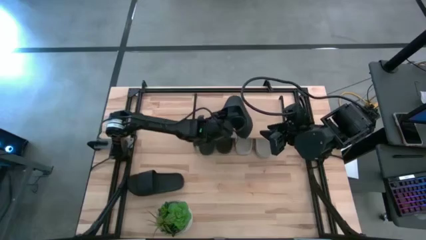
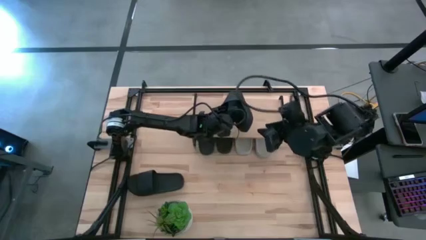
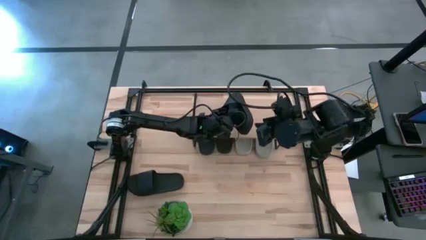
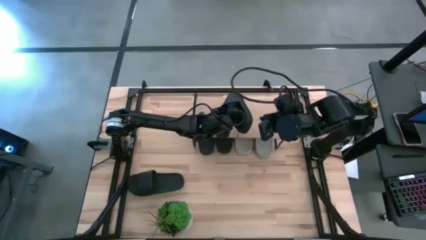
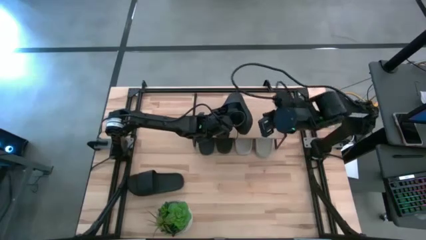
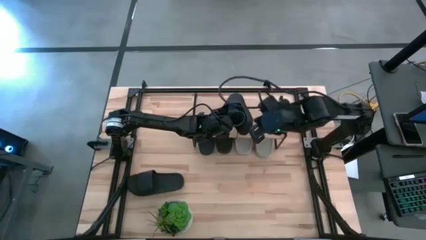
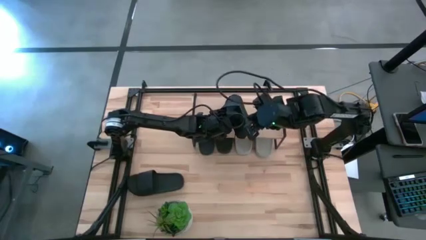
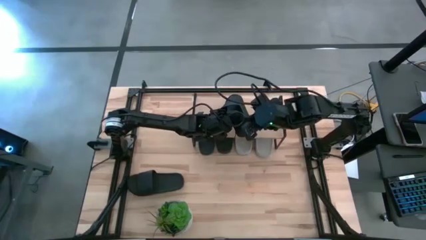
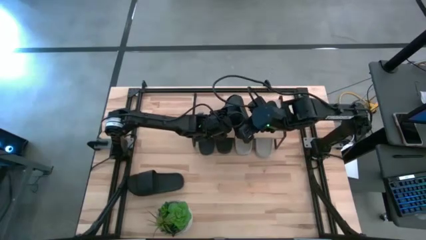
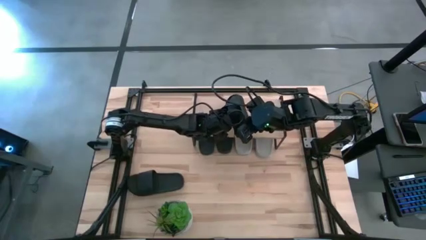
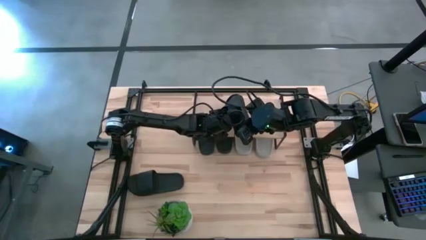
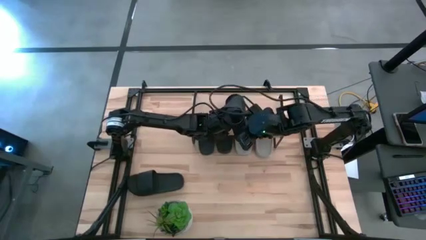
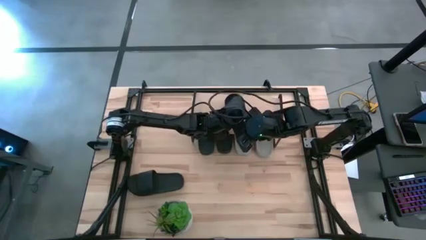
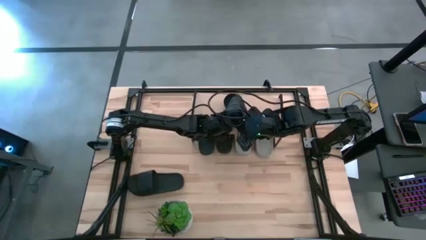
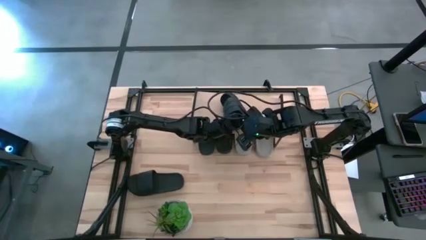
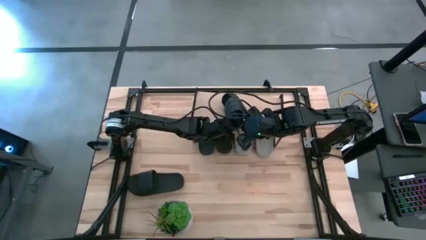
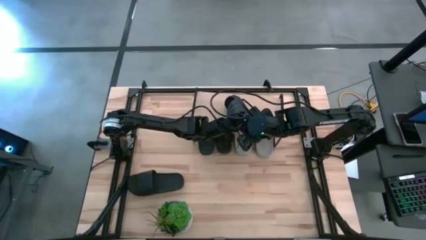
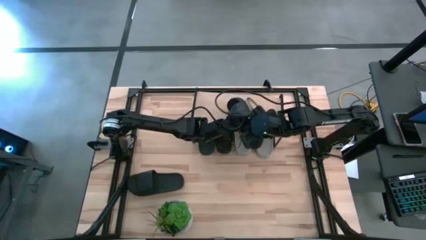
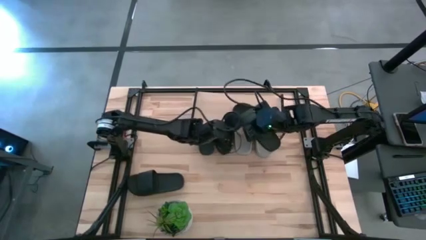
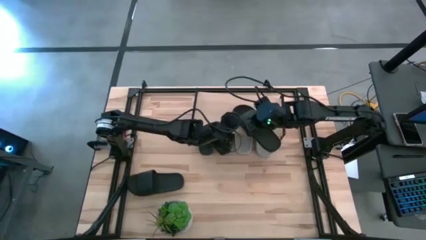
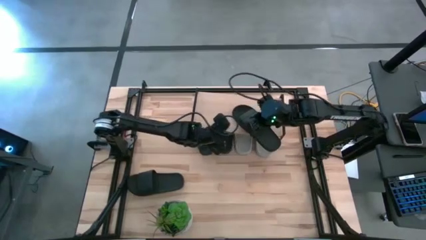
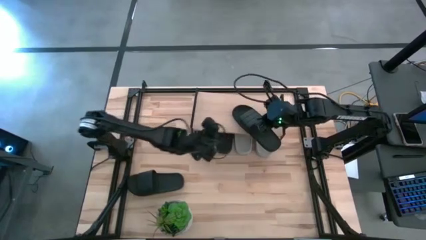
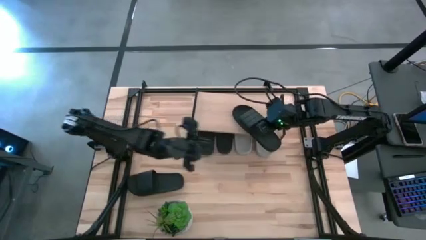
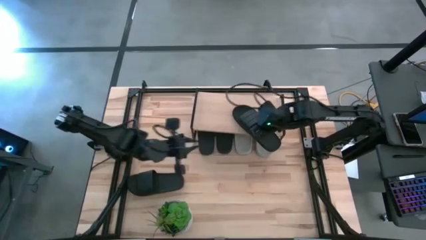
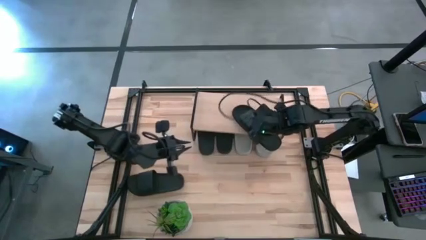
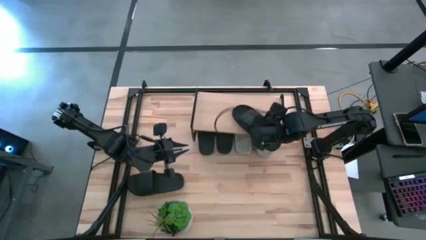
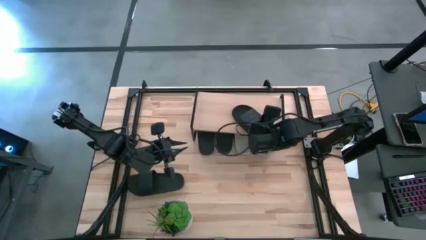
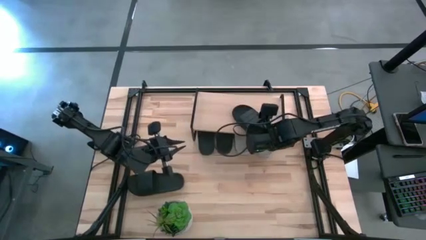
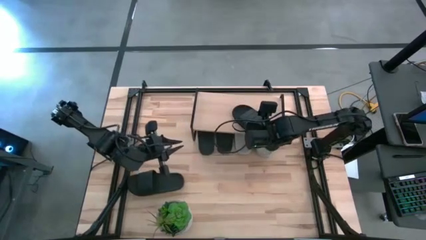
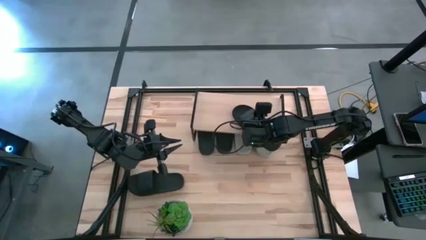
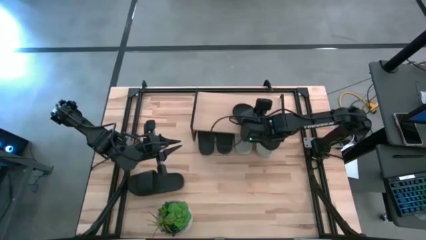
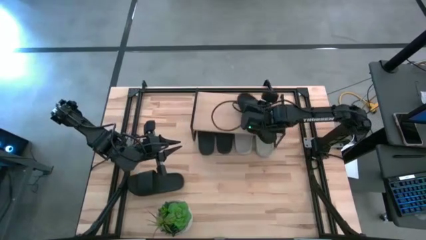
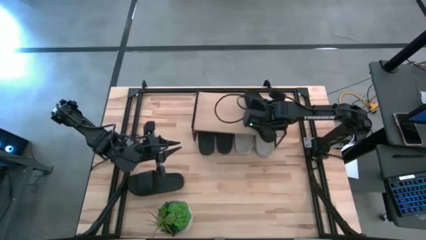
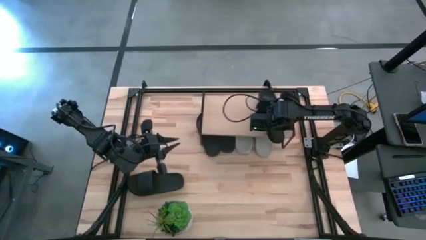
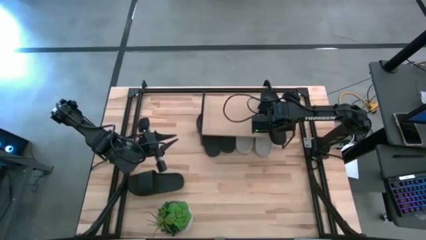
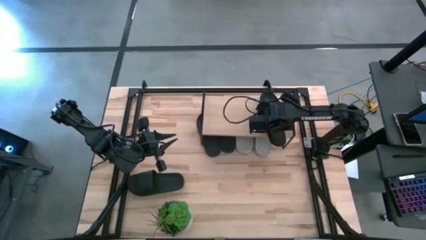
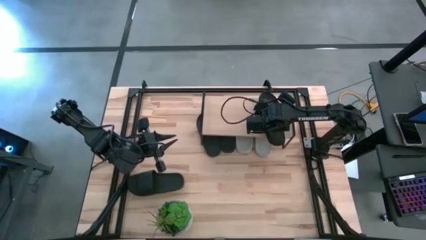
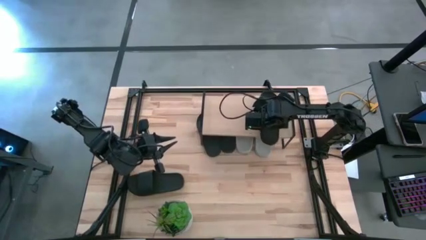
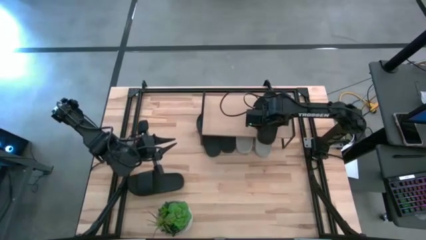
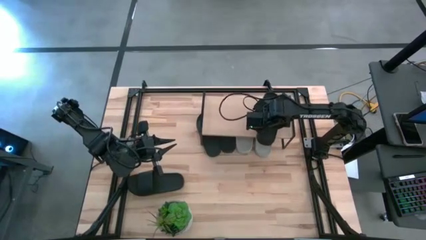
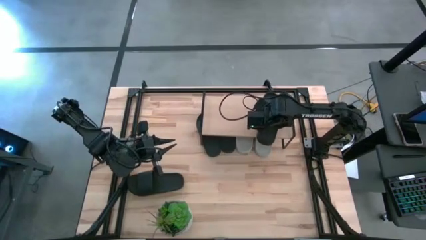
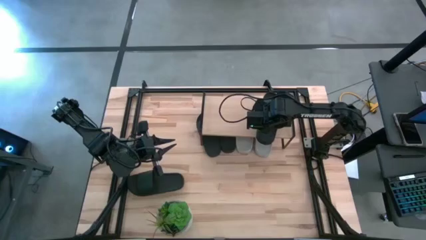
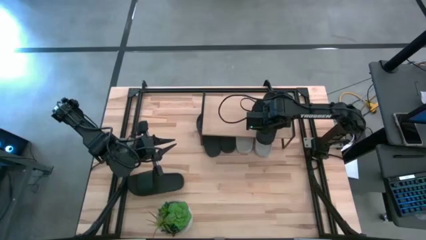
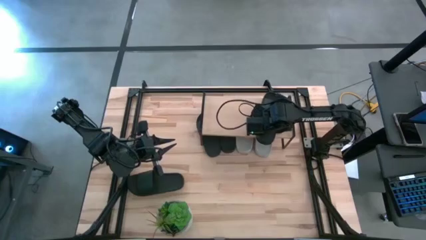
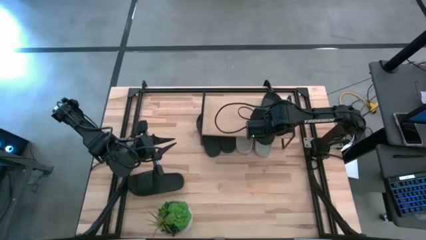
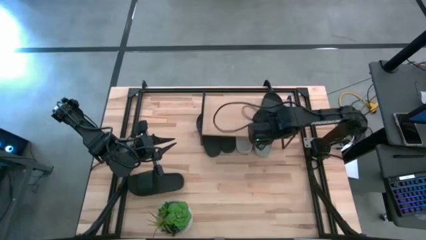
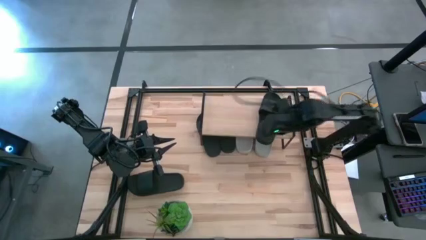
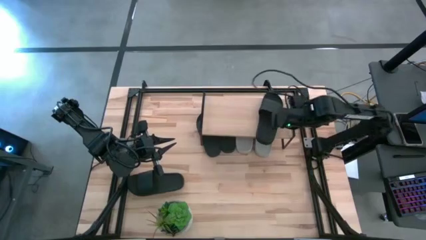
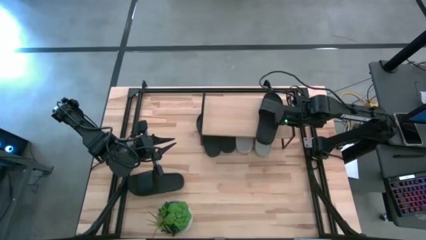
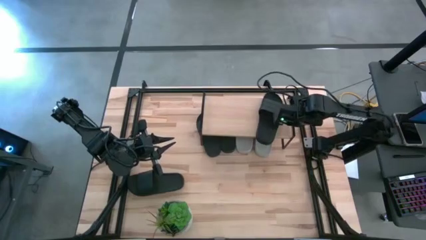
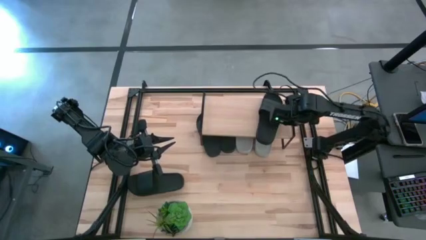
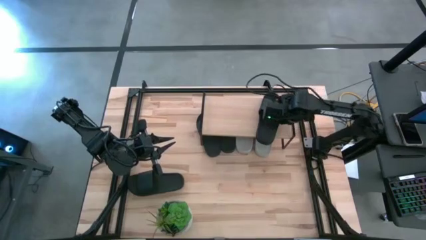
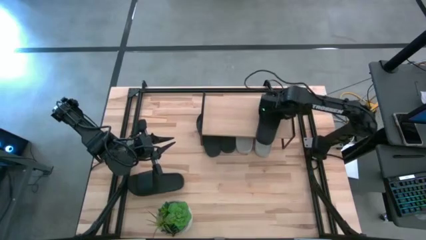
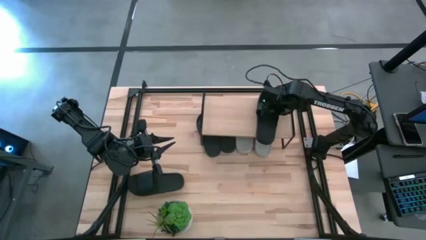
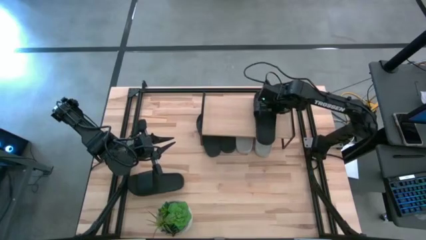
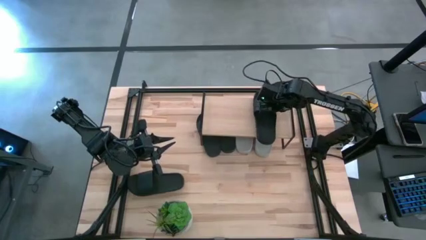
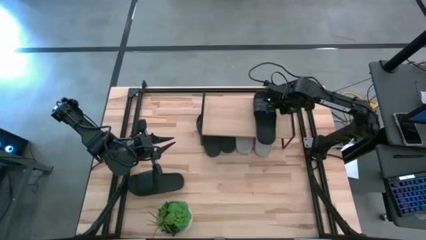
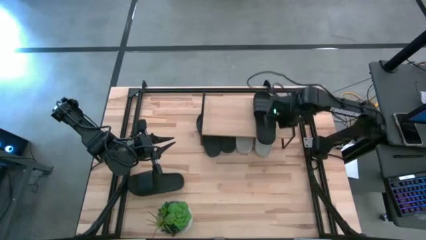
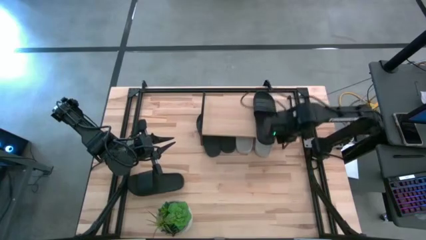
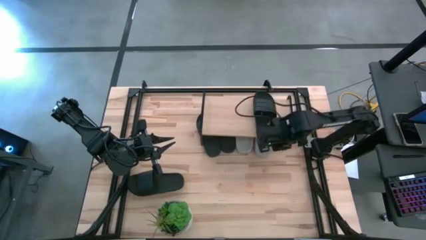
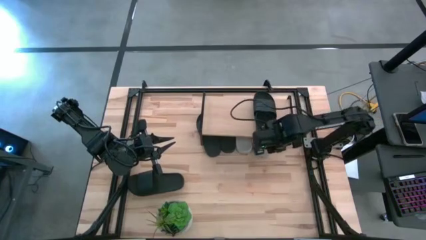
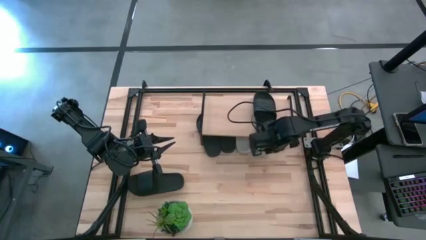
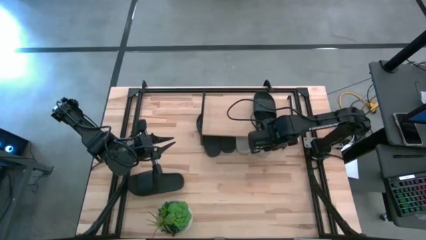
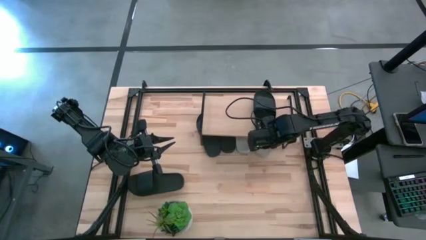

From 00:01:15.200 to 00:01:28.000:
Task: Pick and place slides into the shelf
Put the black slipper on the shelf

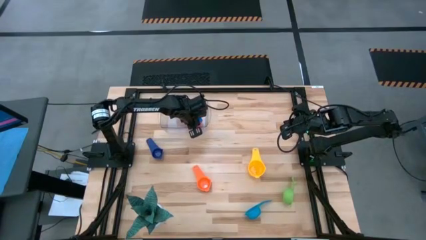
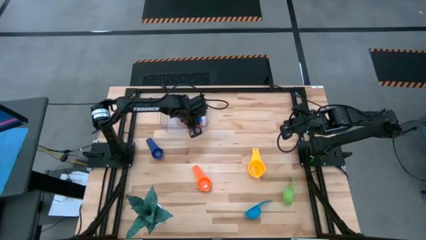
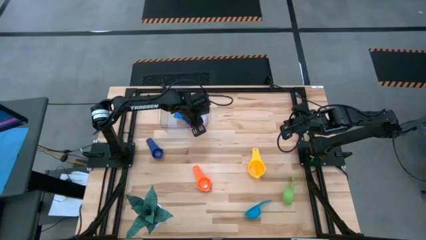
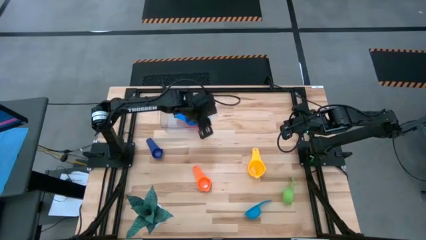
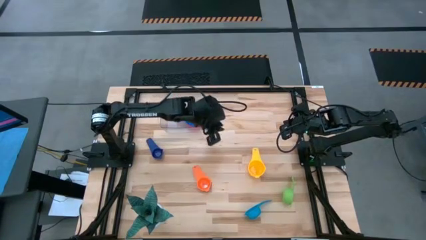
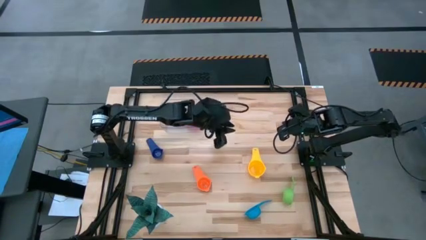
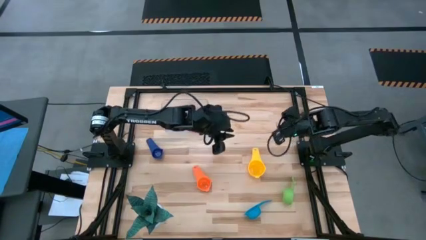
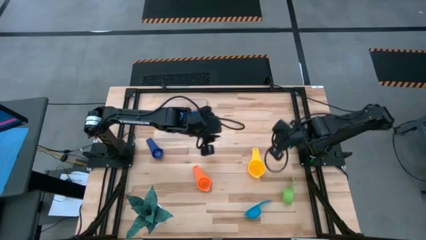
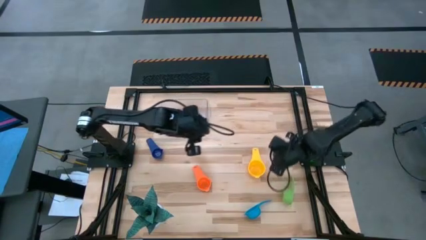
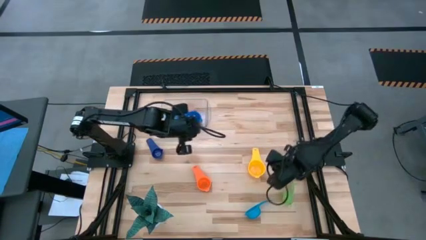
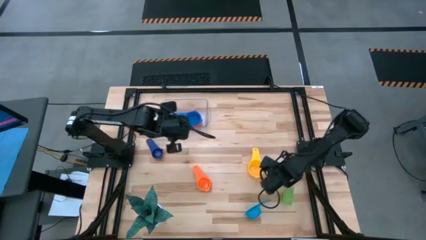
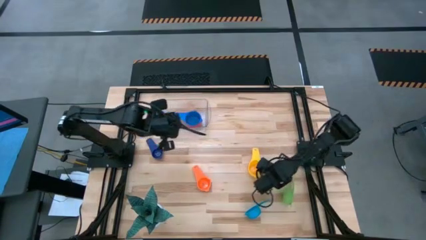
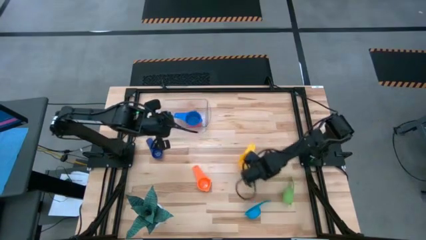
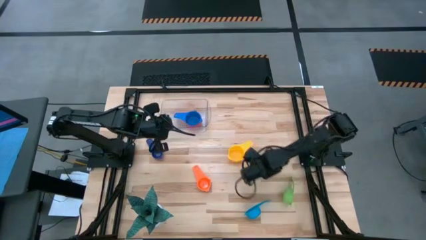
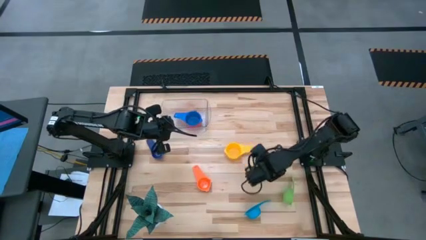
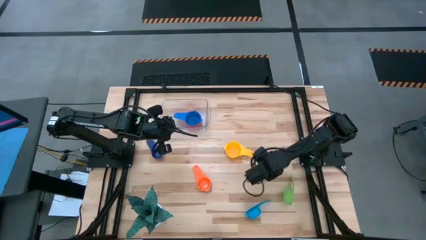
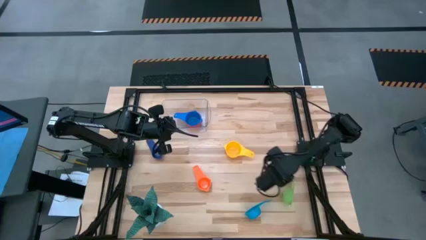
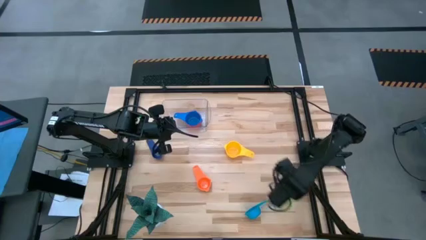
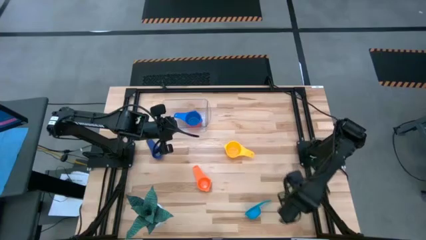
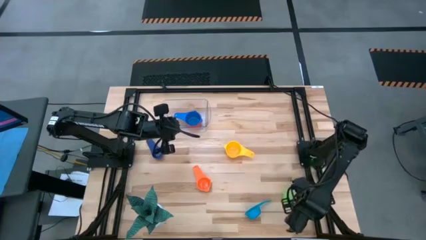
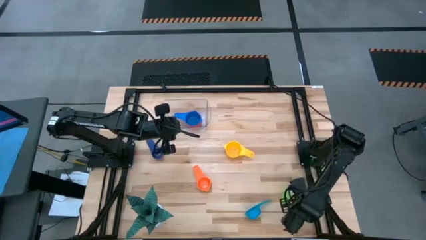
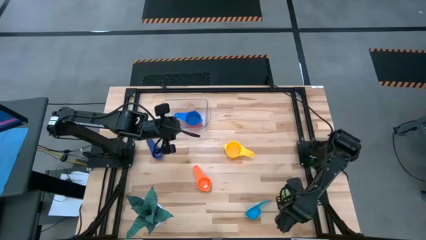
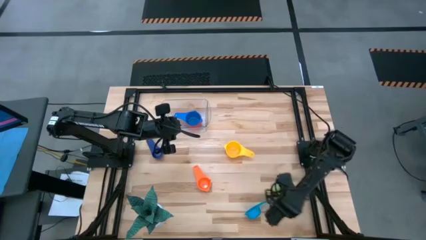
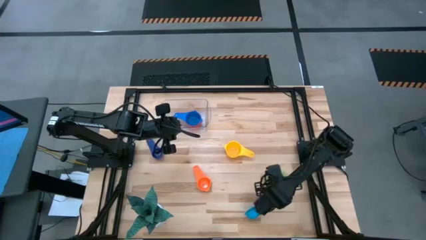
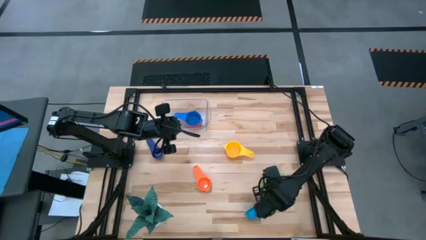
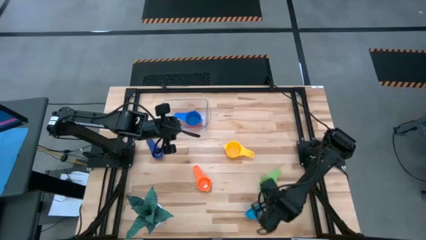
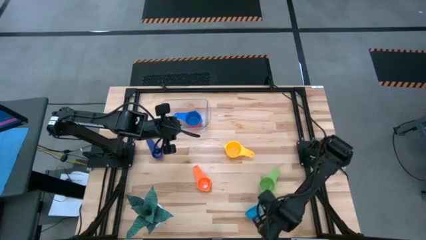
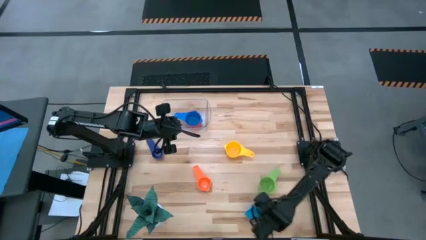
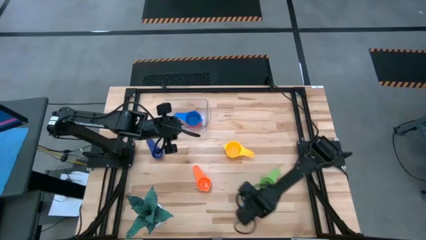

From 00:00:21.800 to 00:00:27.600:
Task: Nest measuring cups in basket
Move the measuring cups to the center of the table
